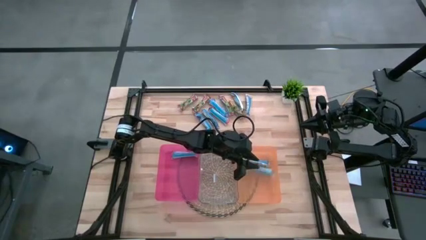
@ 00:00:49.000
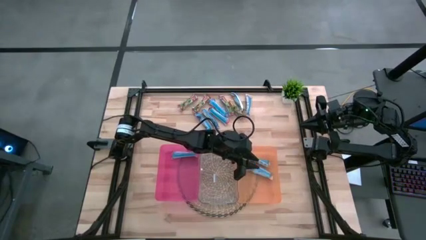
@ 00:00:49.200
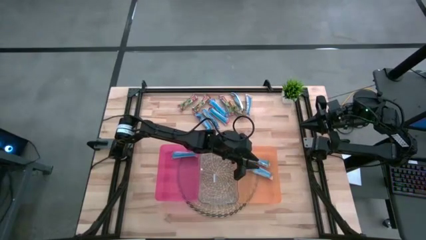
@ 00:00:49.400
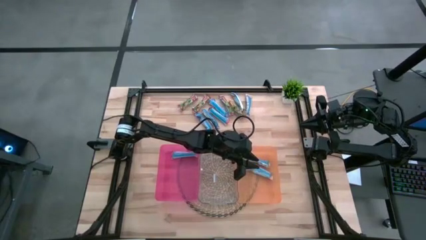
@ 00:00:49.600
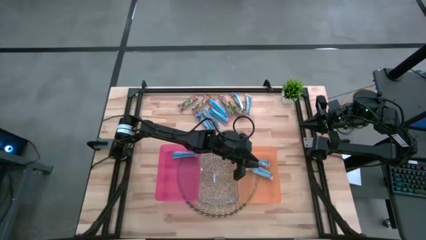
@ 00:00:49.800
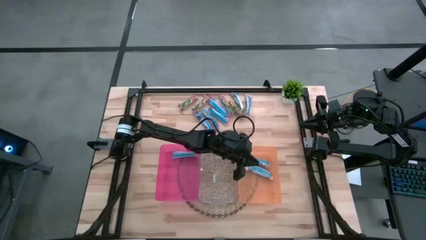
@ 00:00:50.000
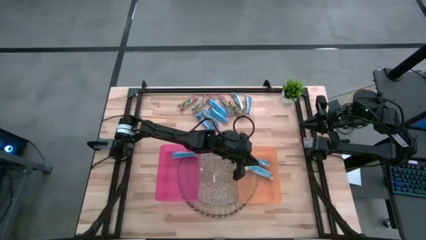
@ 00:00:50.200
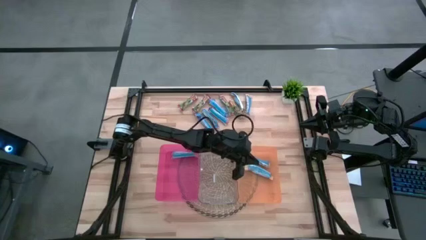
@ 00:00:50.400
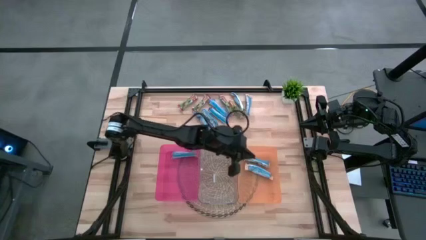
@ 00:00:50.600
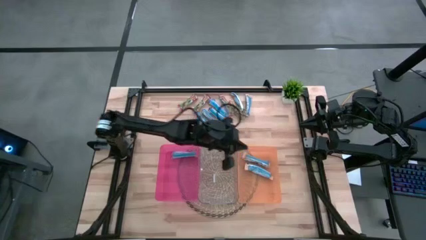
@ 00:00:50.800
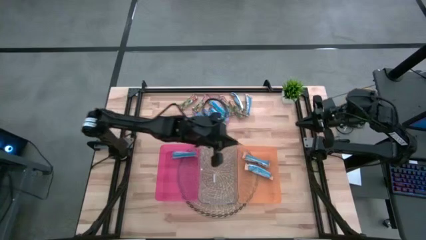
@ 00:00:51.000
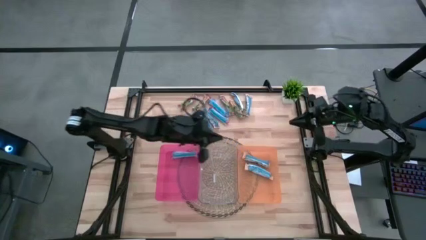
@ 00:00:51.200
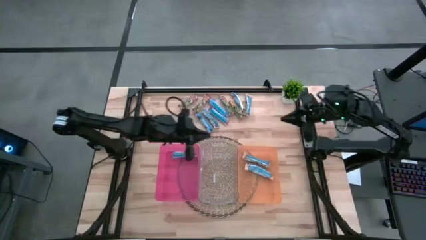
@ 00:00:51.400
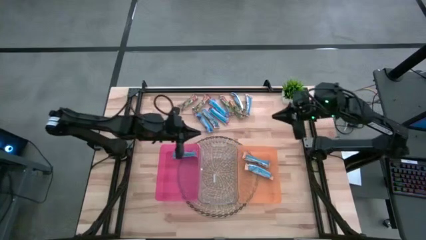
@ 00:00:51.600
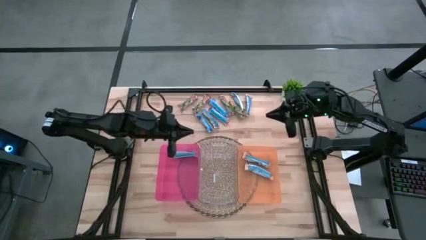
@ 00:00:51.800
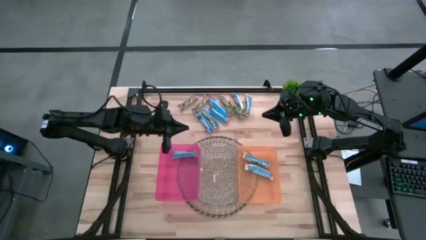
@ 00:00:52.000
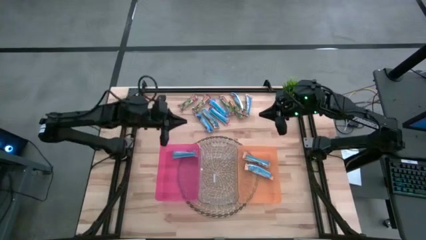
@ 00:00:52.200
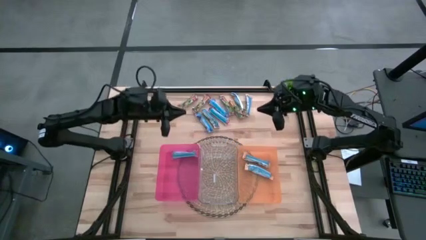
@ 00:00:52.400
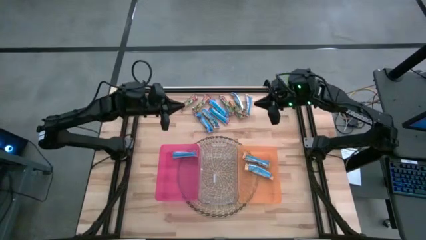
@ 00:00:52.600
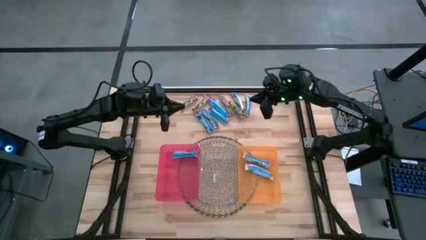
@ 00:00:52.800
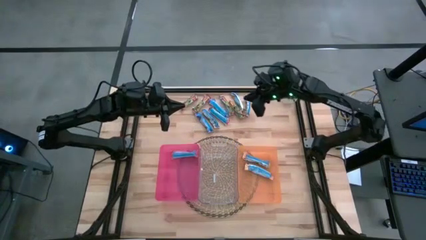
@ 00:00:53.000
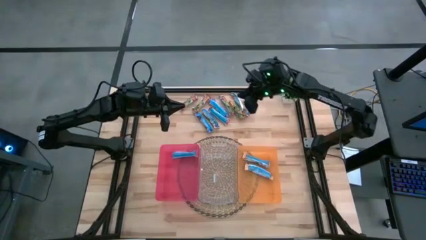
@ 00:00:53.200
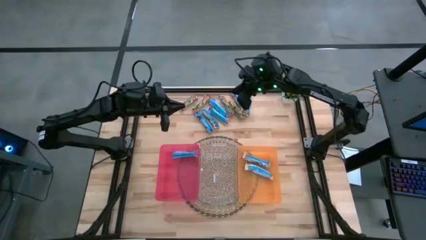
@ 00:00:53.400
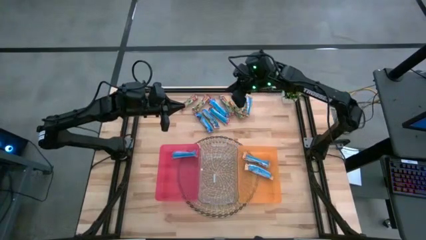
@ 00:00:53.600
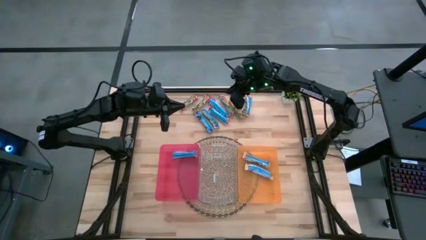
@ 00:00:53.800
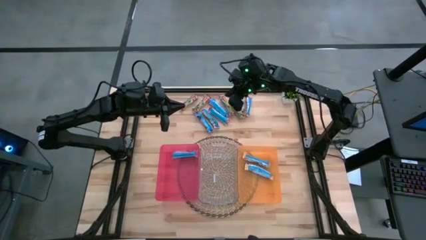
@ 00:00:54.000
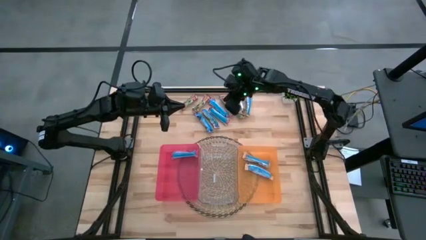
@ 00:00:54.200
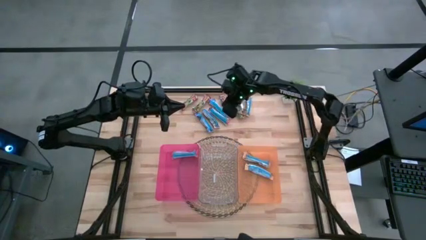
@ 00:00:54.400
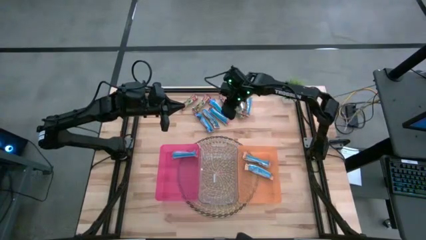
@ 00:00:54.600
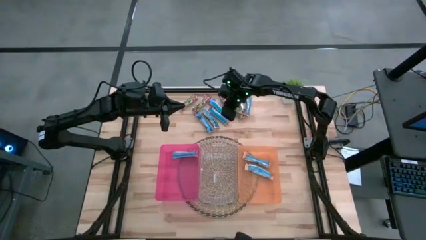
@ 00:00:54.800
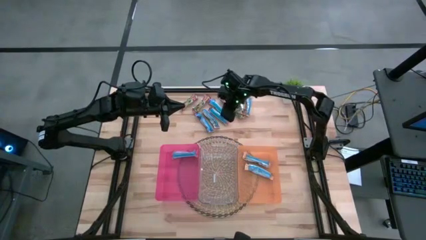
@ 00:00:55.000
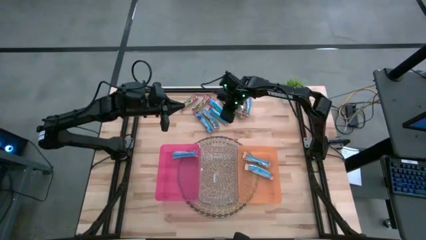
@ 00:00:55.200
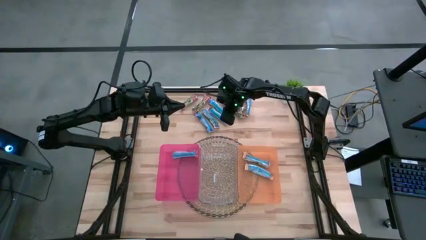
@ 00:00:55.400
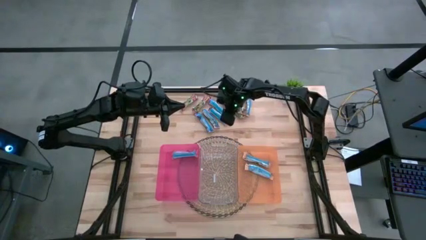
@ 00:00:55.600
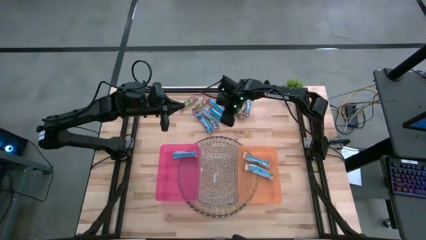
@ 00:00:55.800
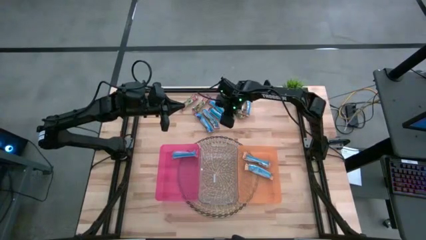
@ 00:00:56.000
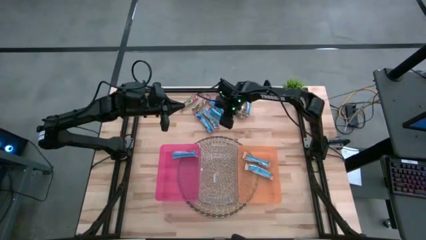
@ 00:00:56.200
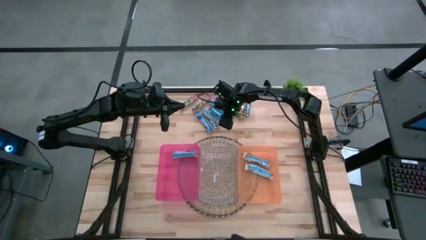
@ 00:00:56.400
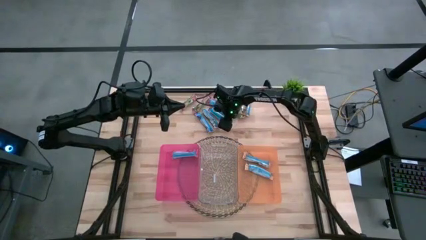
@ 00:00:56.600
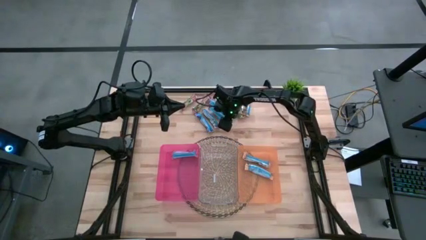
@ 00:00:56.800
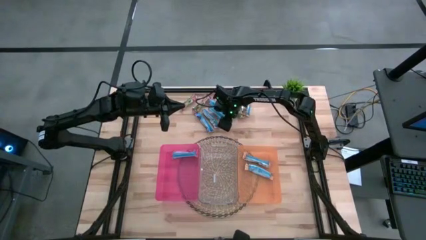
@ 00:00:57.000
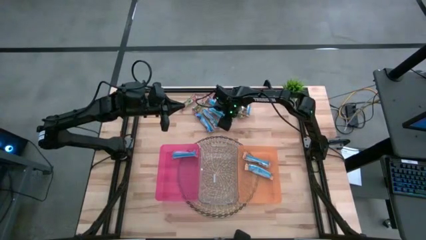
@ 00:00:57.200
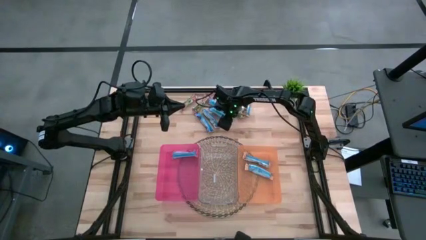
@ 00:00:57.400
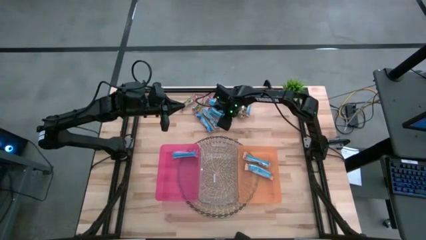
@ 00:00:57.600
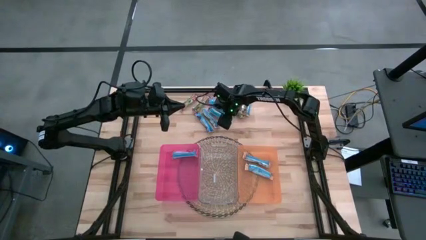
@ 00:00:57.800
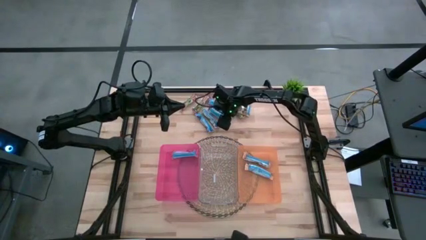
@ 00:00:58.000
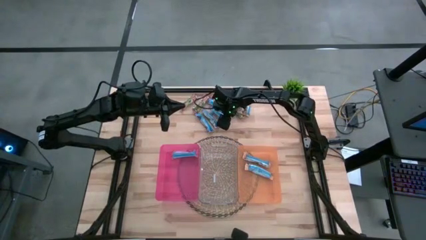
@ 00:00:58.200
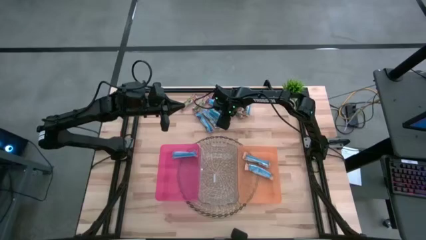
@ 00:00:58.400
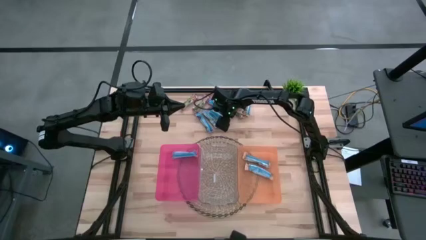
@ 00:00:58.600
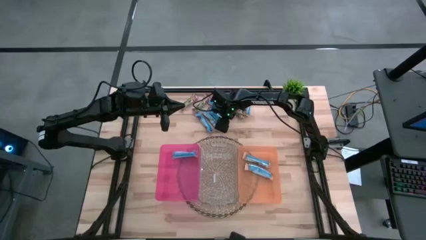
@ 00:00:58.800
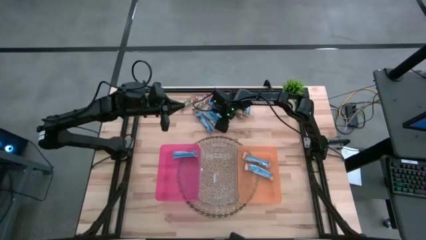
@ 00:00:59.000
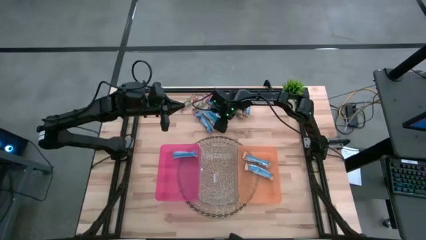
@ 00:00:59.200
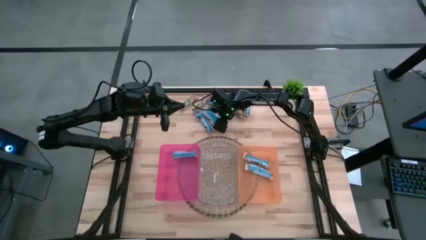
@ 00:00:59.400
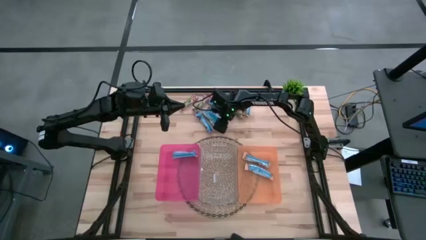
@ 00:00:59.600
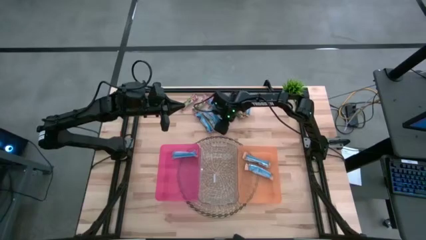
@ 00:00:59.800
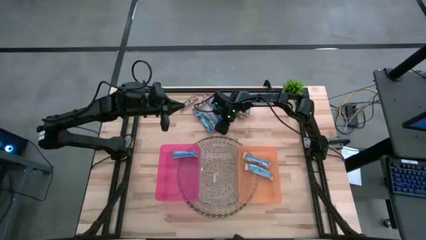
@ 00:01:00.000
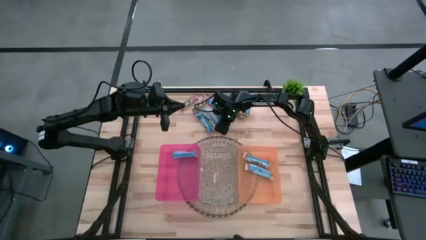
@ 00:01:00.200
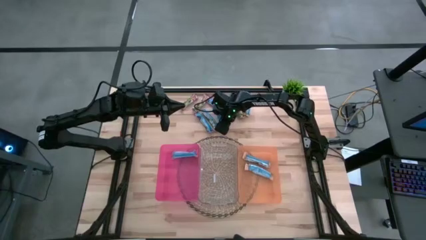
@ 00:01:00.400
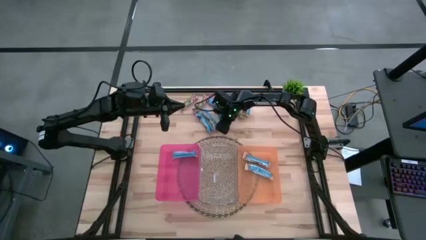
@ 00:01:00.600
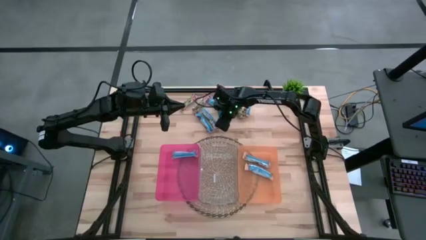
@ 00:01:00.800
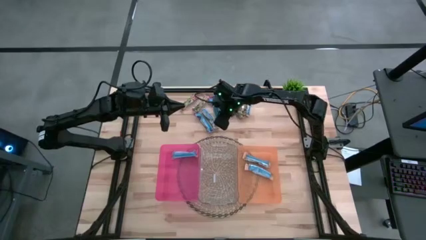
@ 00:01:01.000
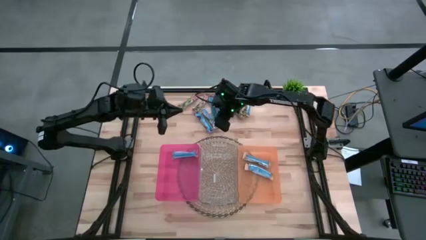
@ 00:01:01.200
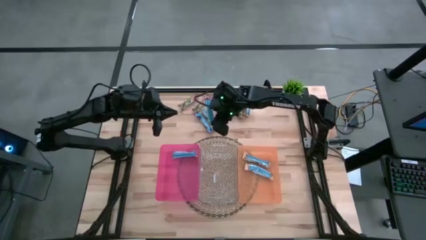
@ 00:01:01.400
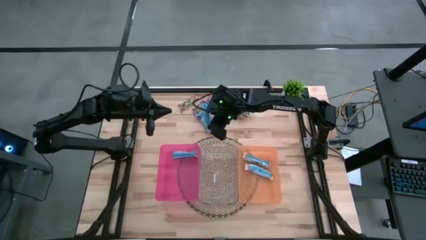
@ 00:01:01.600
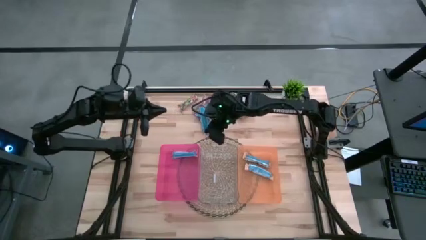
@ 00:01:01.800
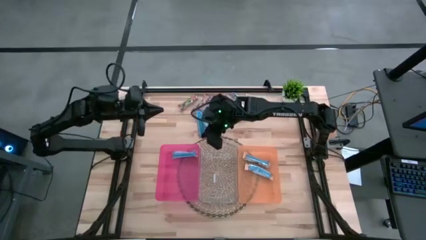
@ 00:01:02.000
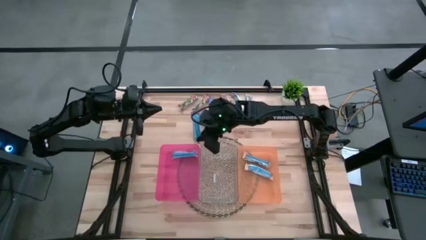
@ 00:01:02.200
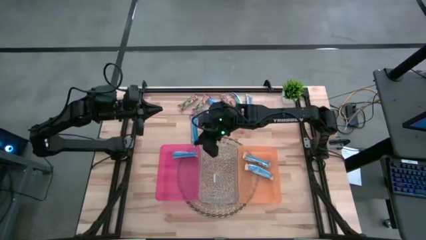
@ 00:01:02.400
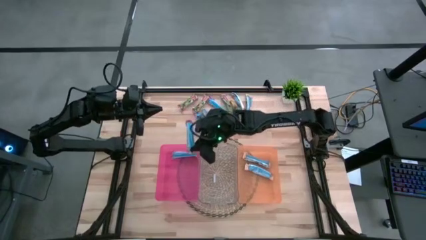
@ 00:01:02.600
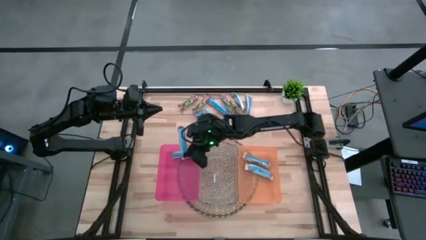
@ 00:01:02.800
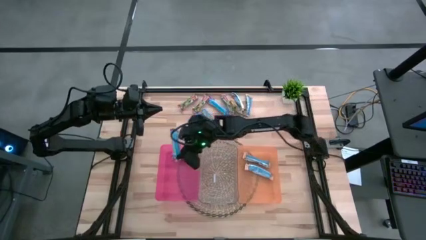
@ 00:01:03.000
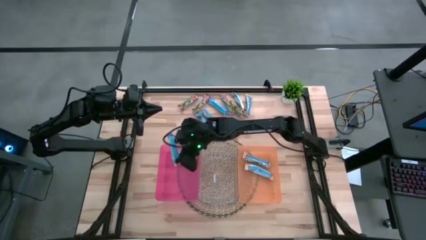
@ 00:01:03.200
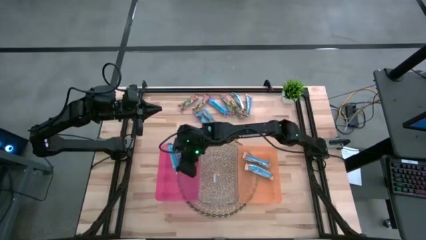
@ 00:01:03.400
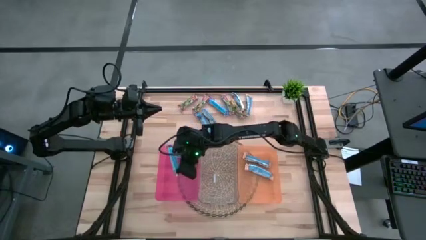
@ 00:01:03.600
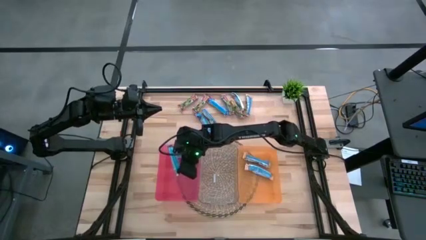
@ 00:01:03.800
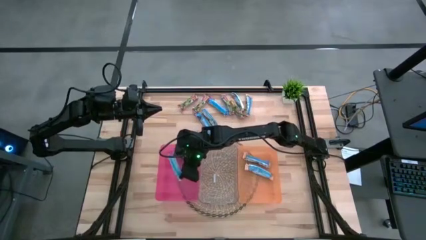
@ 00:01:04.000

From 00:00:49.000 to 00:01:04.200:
Task: Pick and place Granola Bars by type
Put the red granola bar into the pink bin
